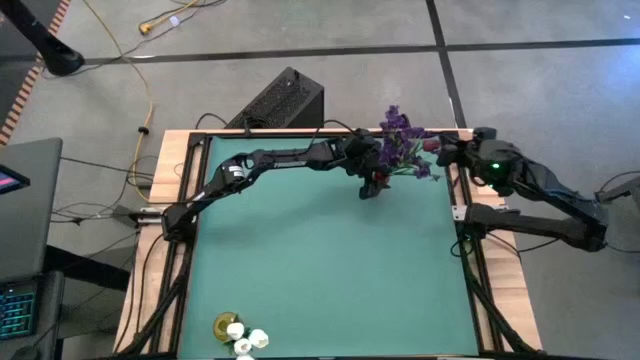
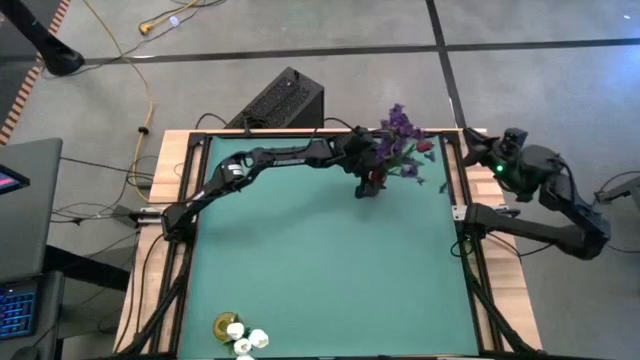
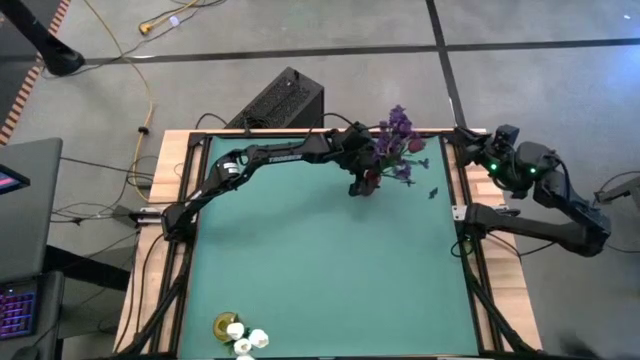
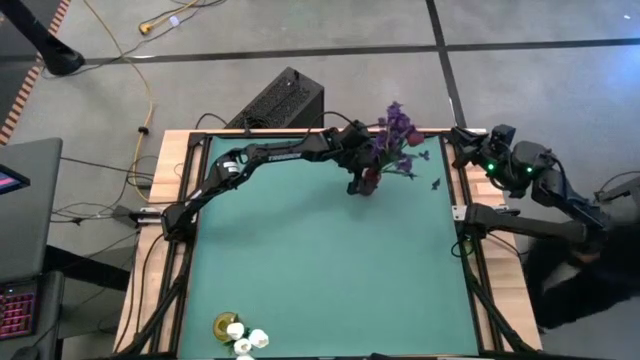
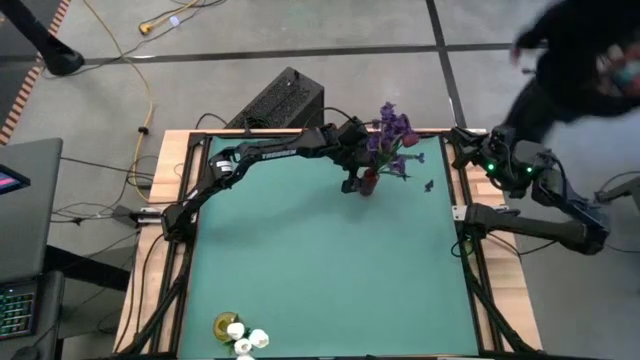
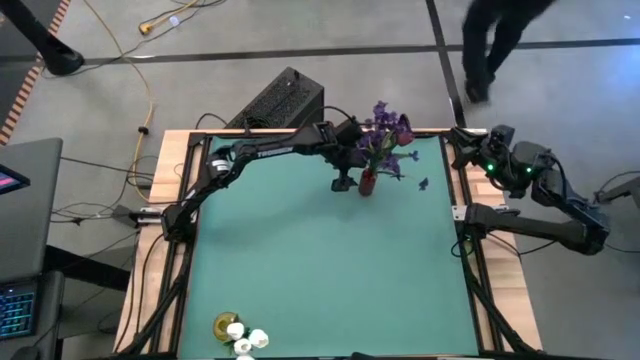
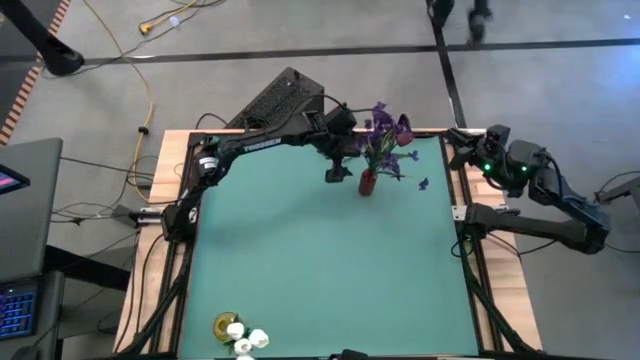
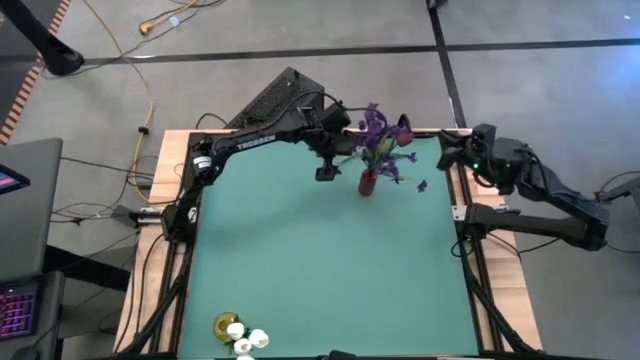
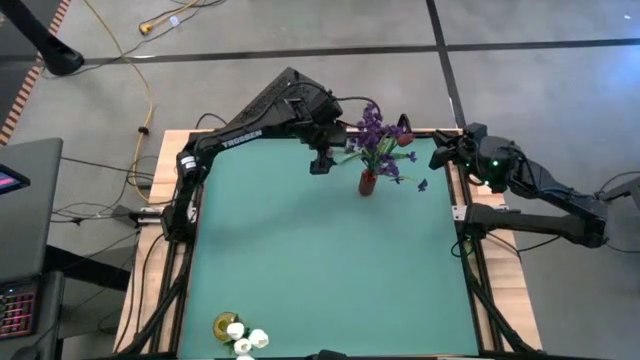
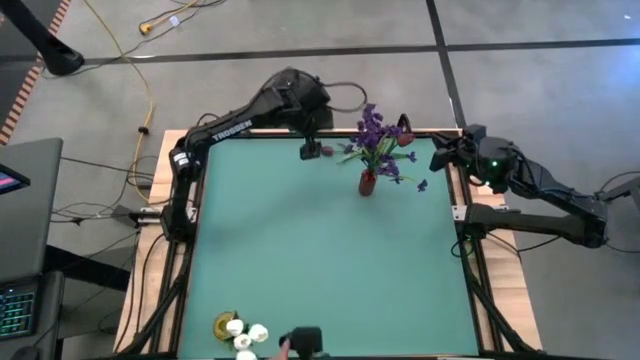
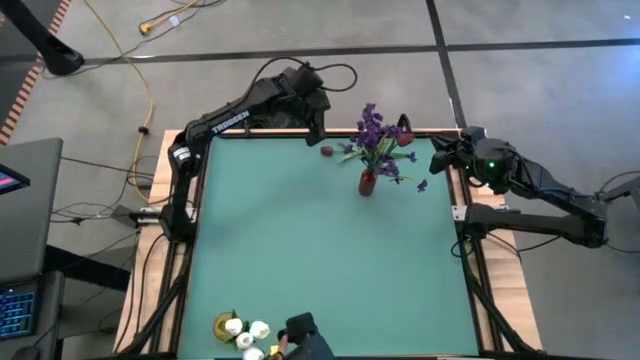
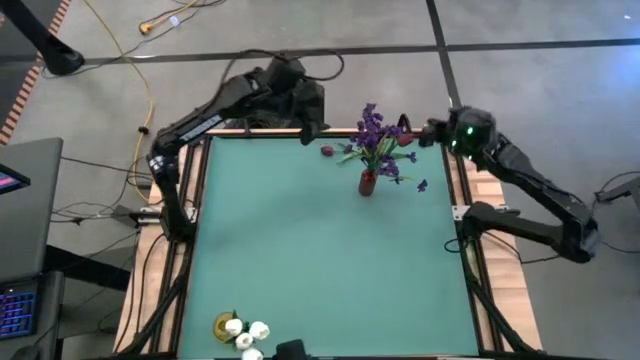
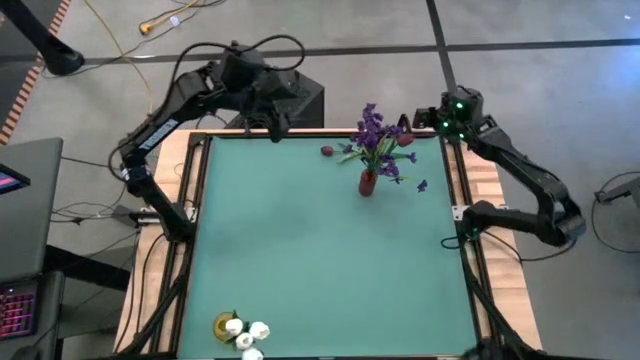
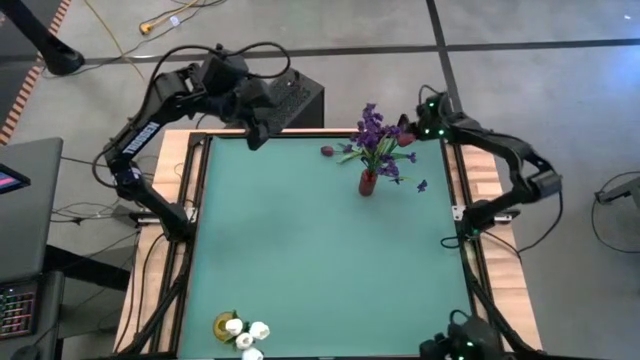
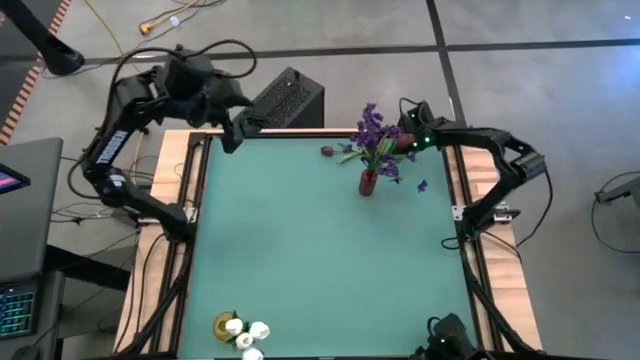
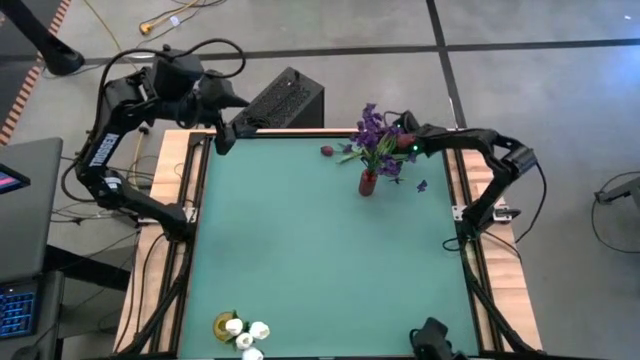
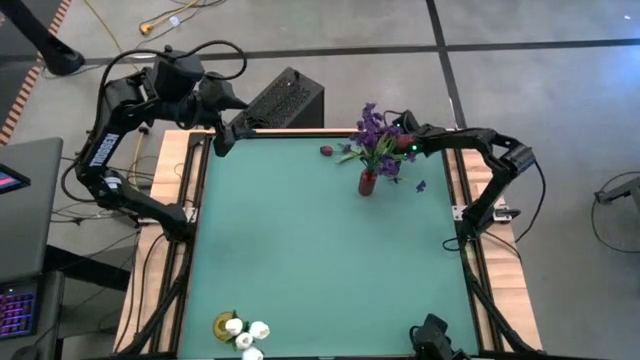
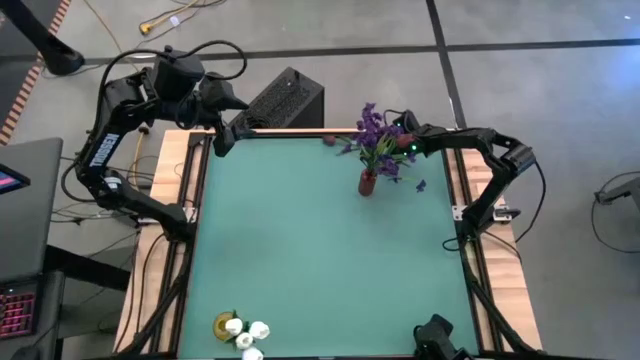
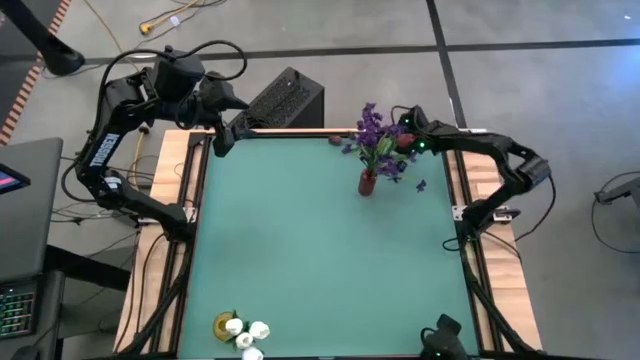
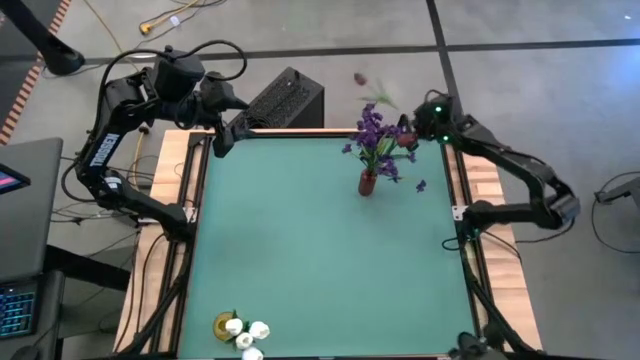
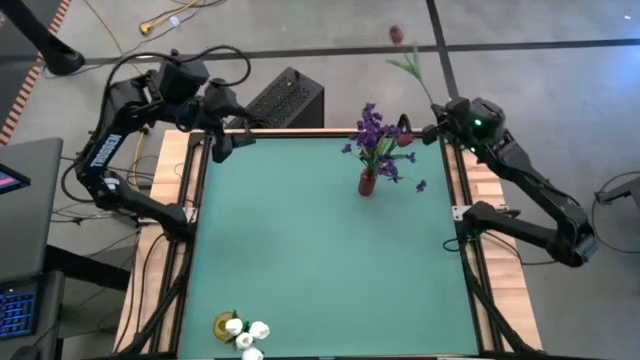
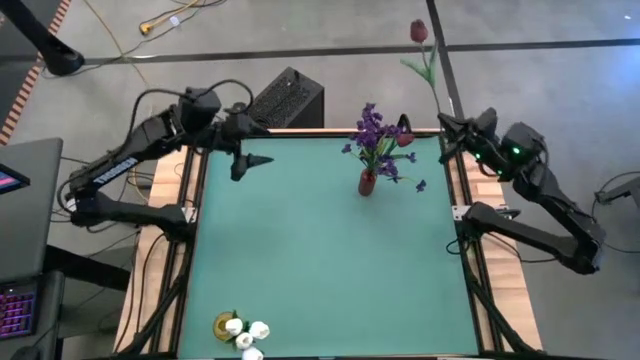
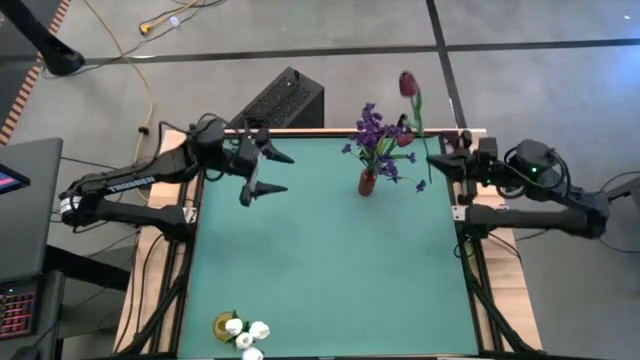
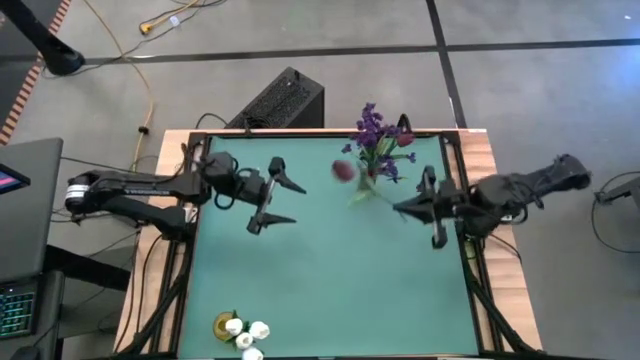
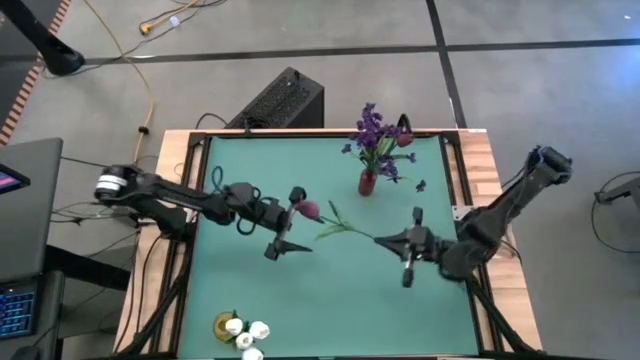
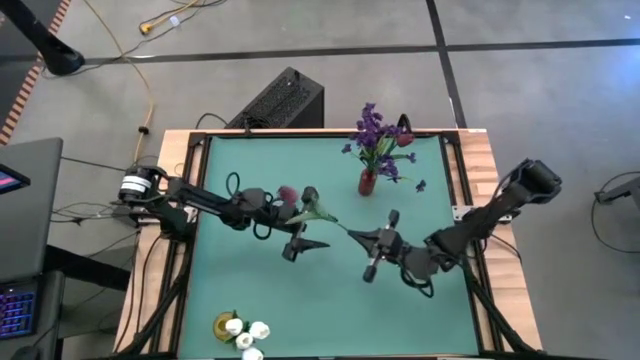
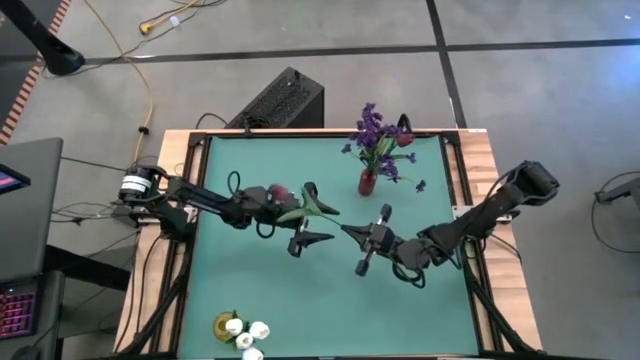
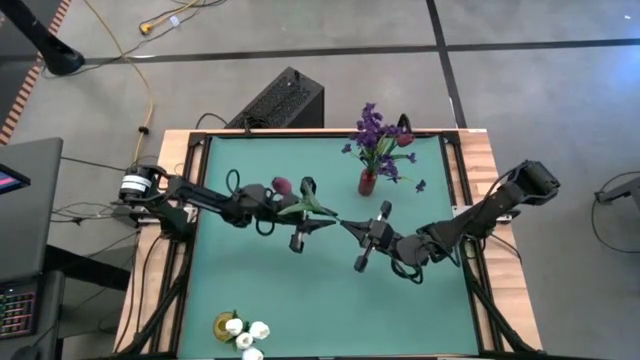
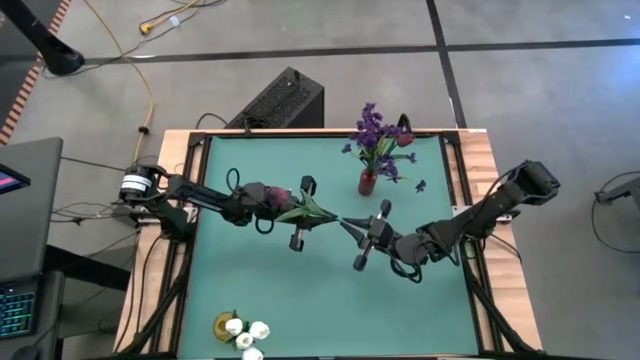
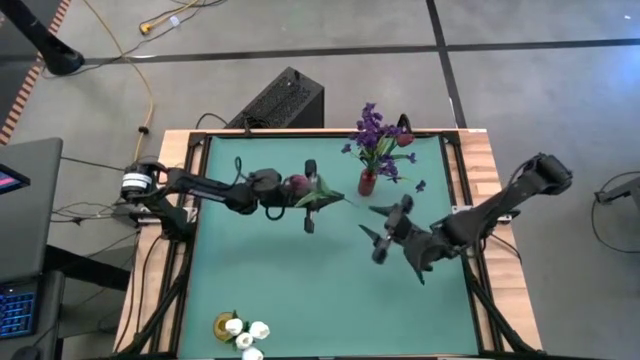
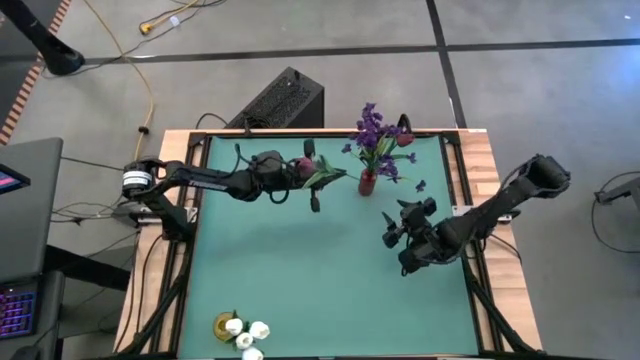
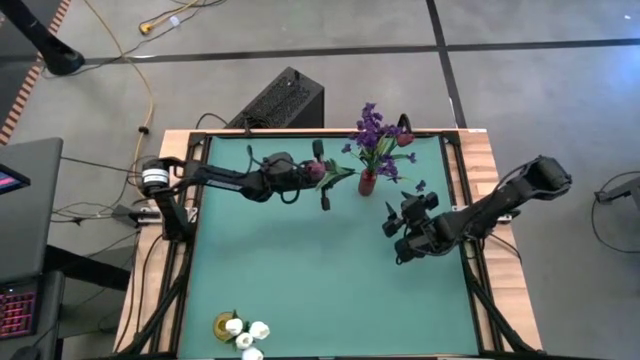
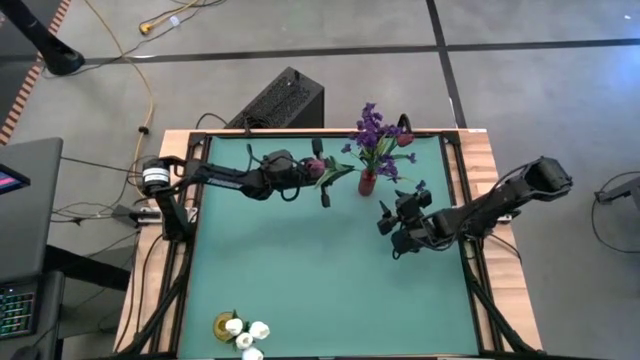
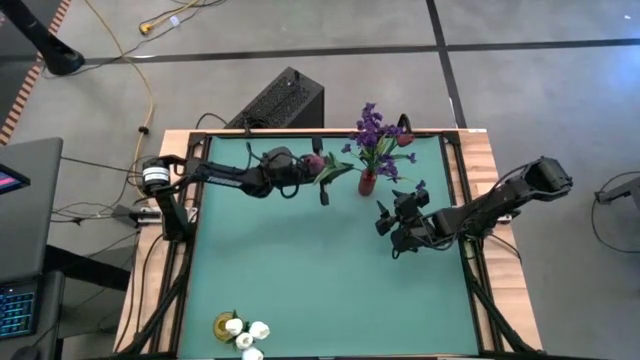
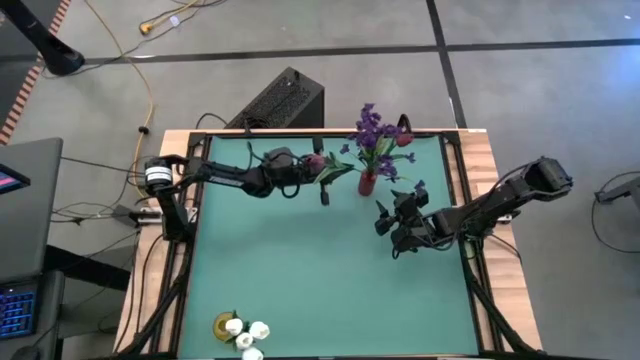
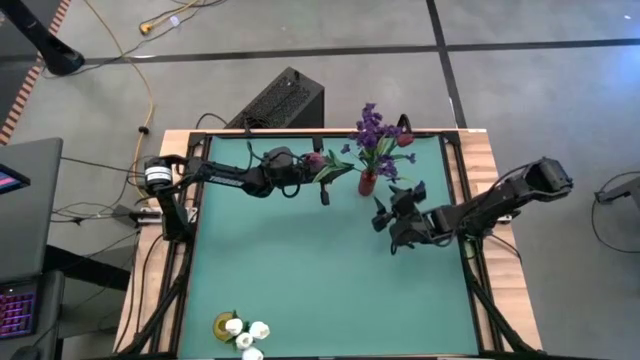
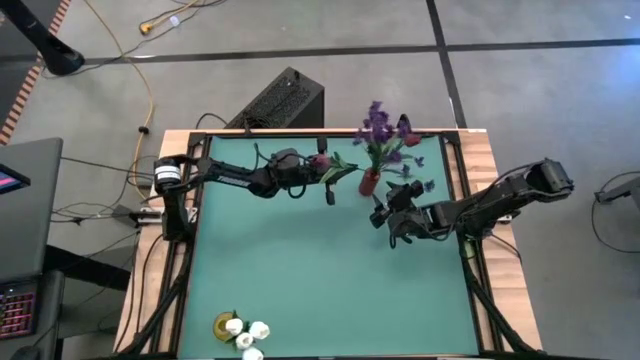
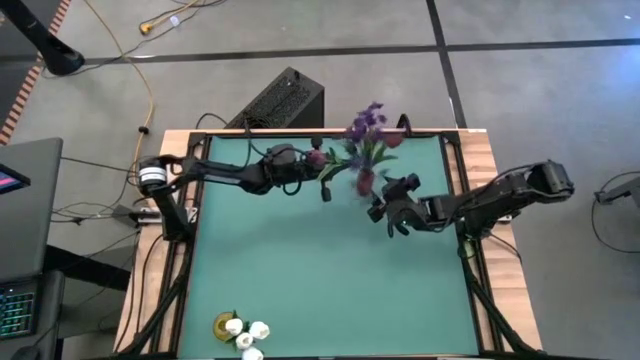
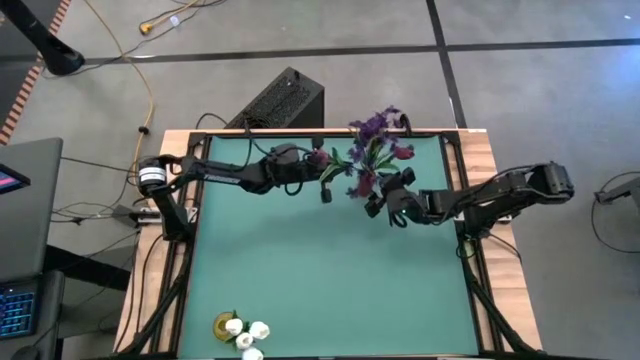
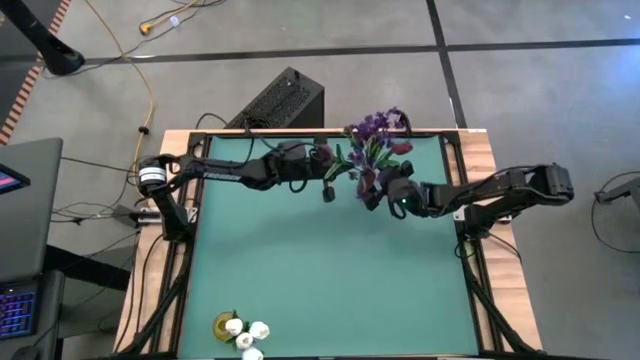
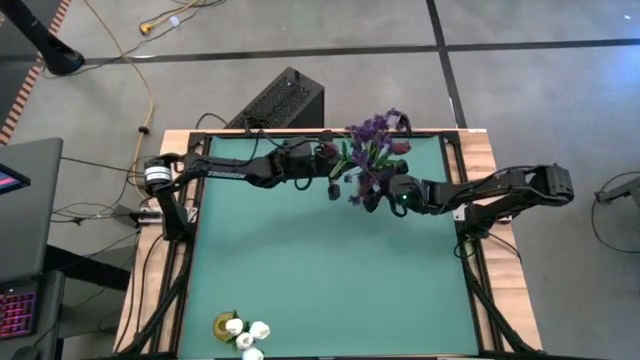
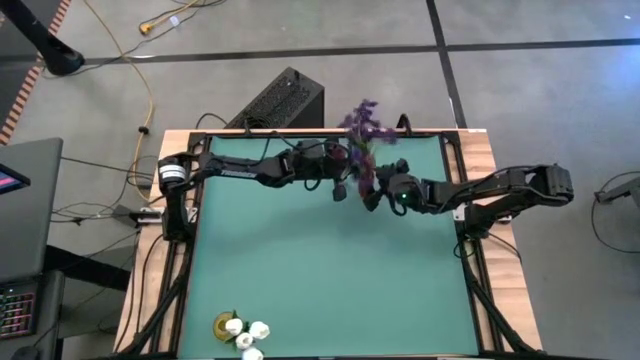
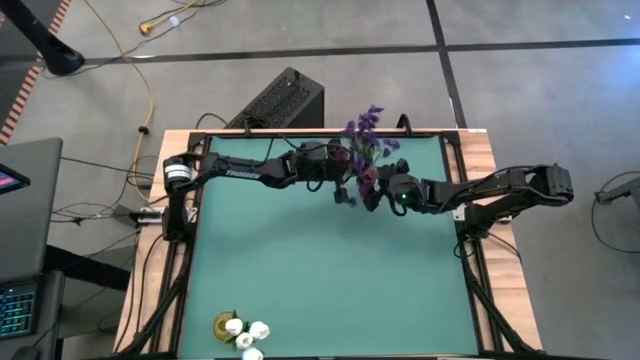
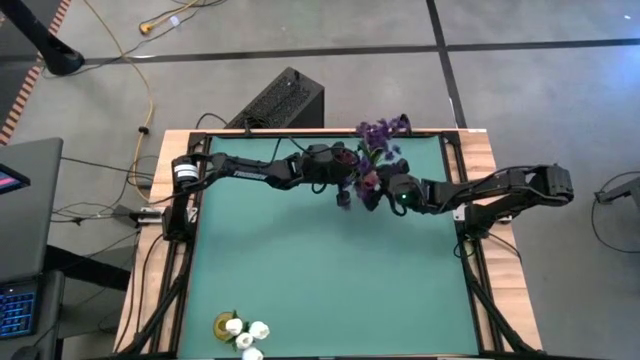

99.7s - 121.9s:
Task: Sort flowers into vase by color
Put the red flowers into the red vase
